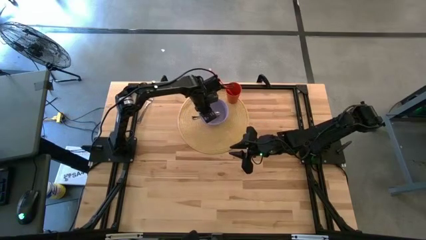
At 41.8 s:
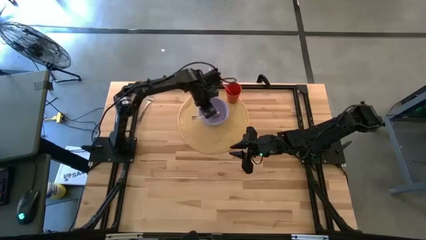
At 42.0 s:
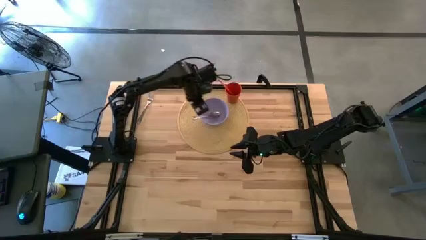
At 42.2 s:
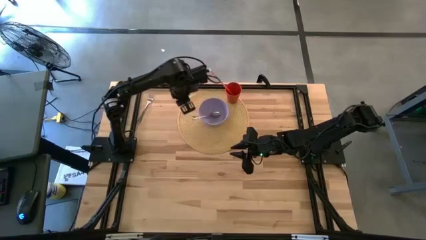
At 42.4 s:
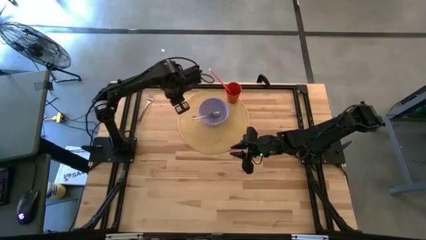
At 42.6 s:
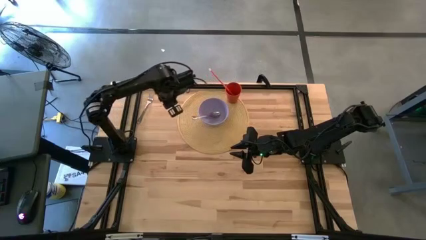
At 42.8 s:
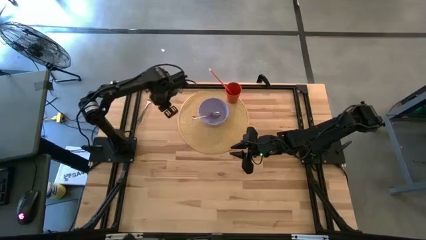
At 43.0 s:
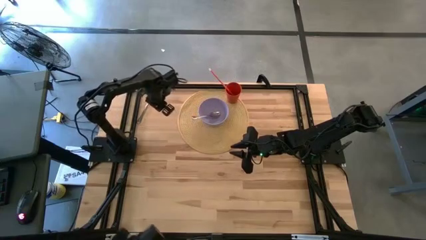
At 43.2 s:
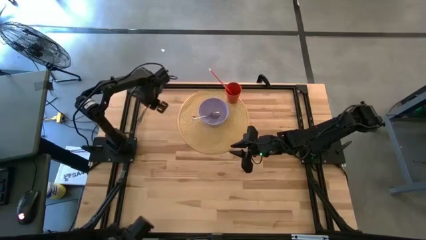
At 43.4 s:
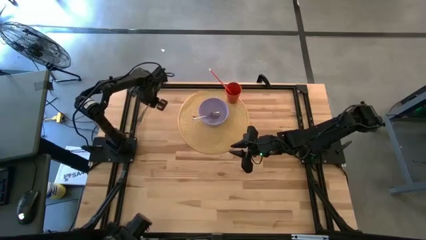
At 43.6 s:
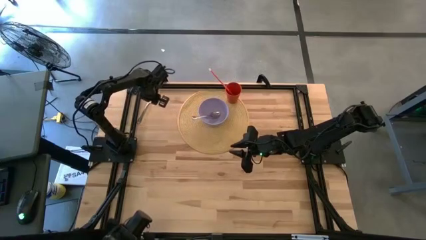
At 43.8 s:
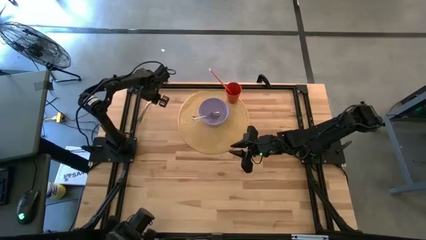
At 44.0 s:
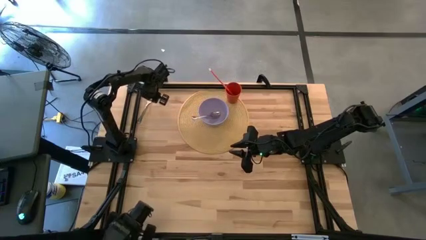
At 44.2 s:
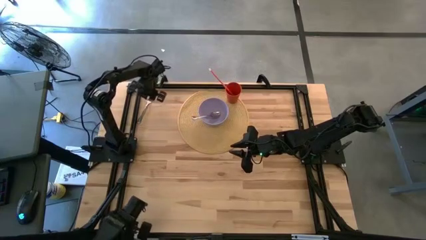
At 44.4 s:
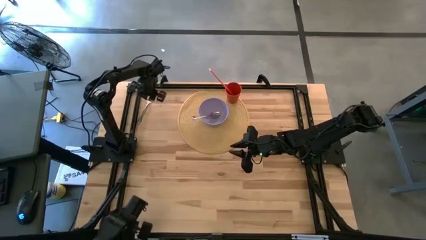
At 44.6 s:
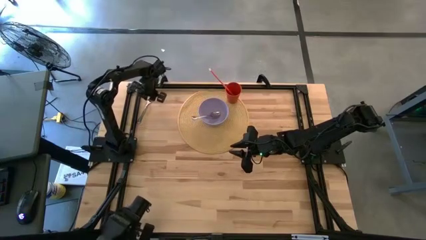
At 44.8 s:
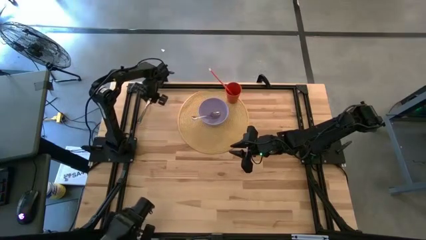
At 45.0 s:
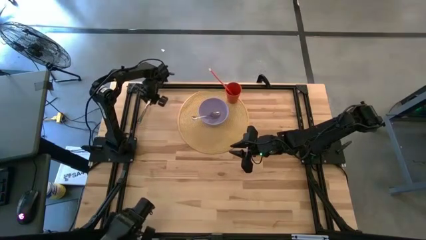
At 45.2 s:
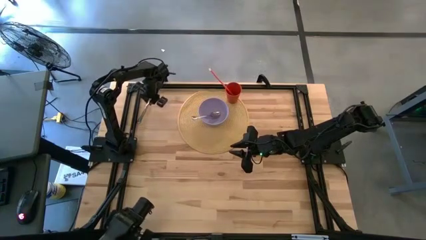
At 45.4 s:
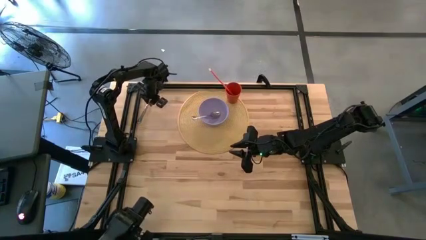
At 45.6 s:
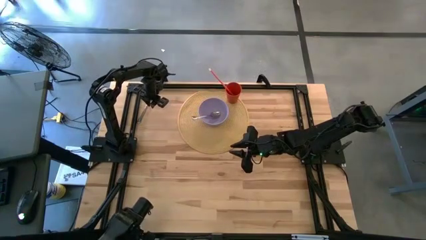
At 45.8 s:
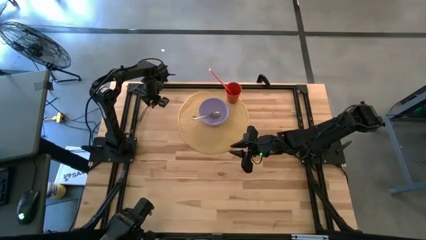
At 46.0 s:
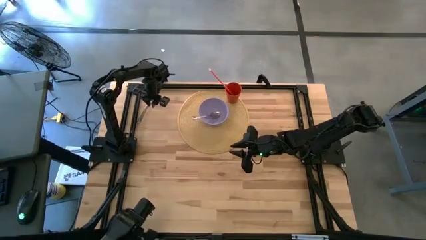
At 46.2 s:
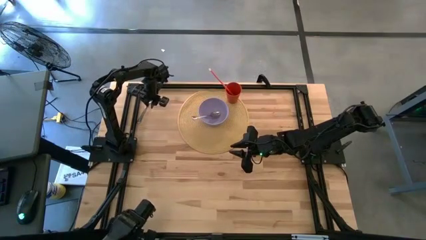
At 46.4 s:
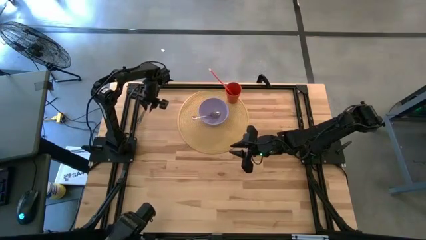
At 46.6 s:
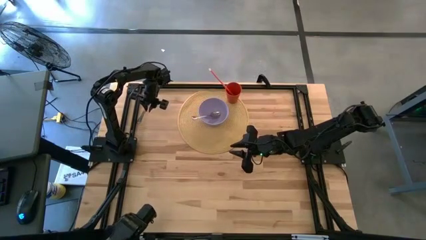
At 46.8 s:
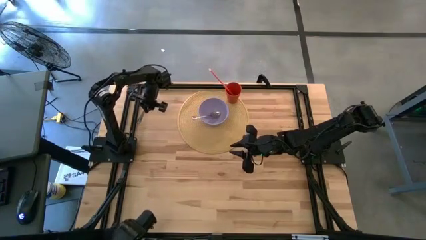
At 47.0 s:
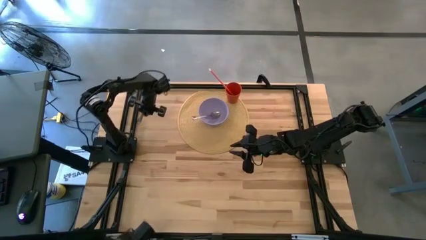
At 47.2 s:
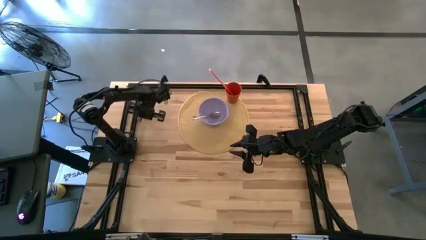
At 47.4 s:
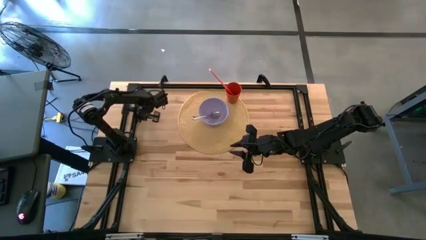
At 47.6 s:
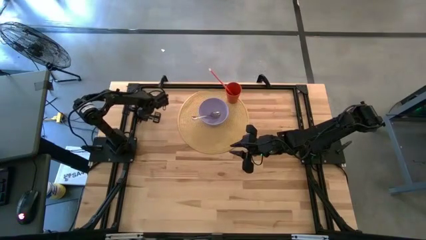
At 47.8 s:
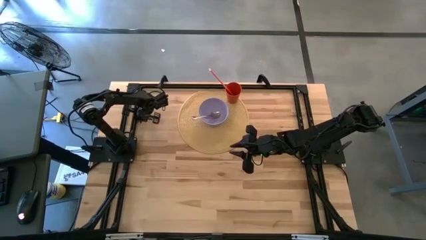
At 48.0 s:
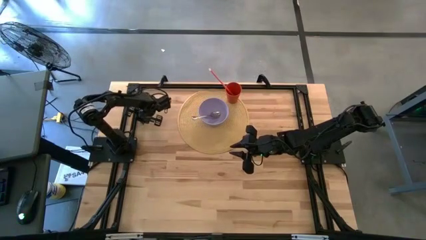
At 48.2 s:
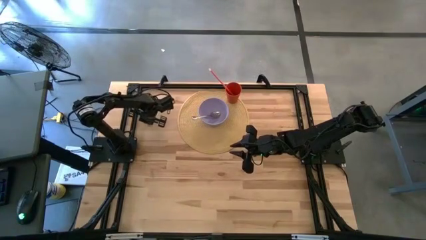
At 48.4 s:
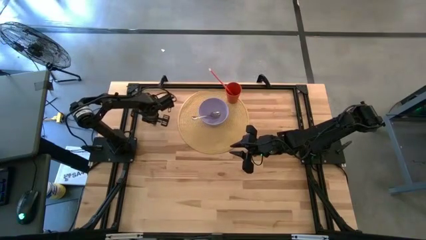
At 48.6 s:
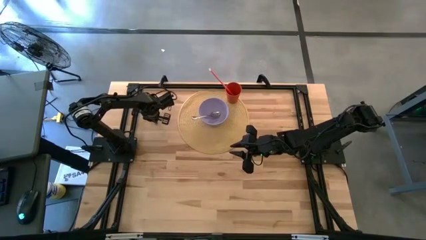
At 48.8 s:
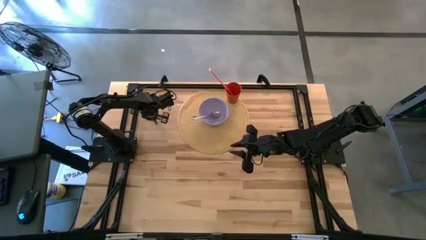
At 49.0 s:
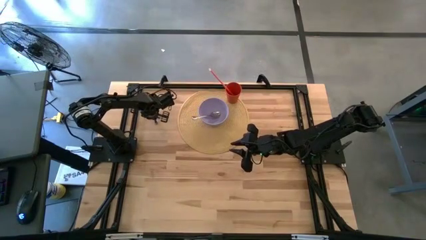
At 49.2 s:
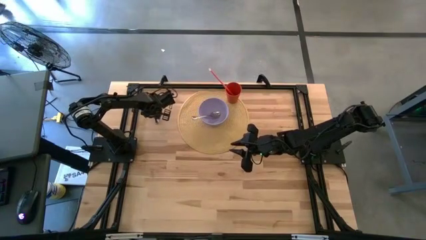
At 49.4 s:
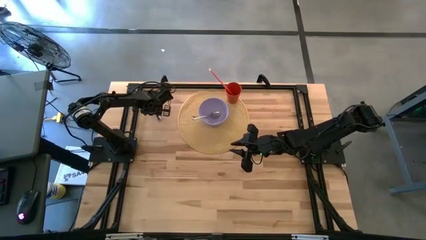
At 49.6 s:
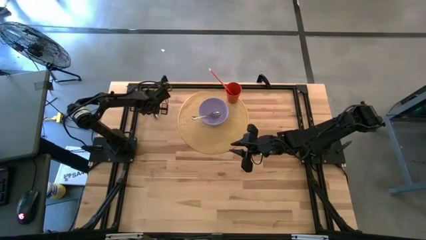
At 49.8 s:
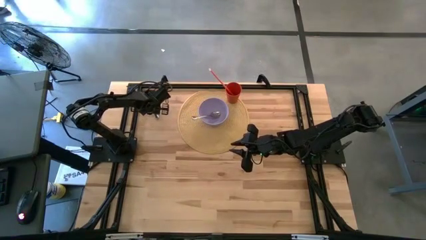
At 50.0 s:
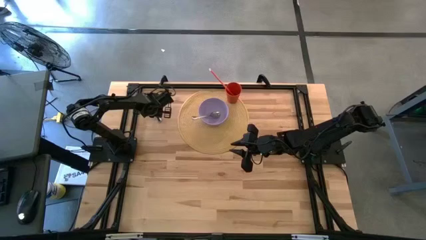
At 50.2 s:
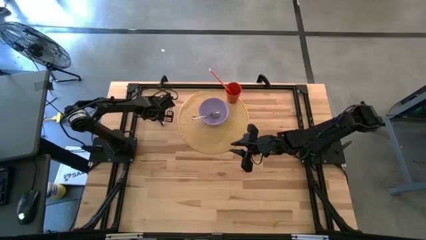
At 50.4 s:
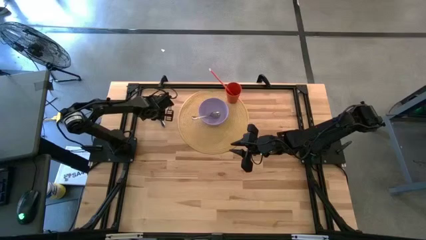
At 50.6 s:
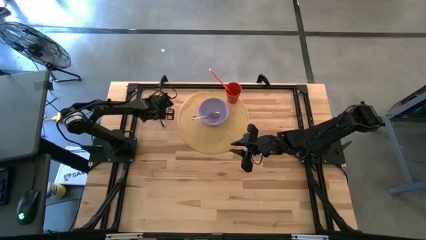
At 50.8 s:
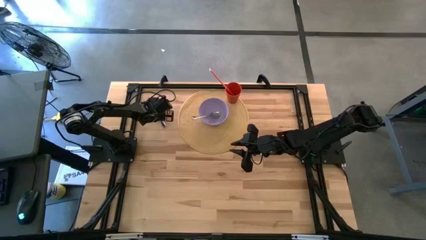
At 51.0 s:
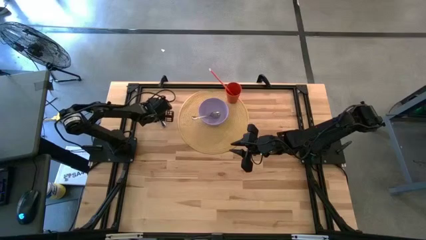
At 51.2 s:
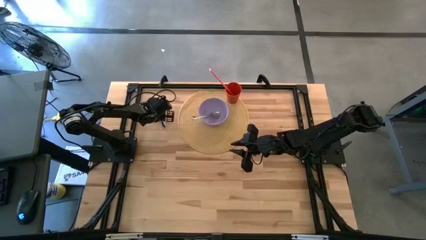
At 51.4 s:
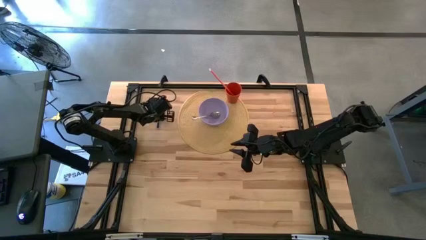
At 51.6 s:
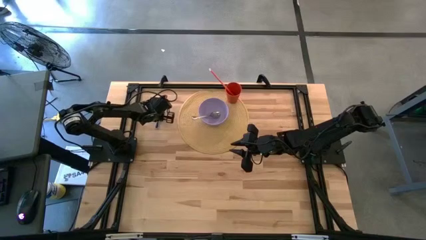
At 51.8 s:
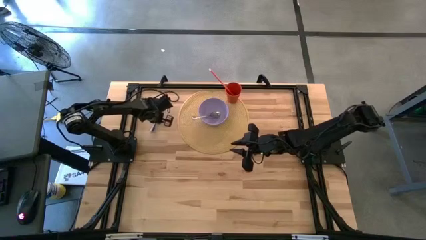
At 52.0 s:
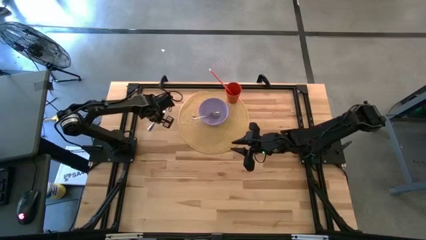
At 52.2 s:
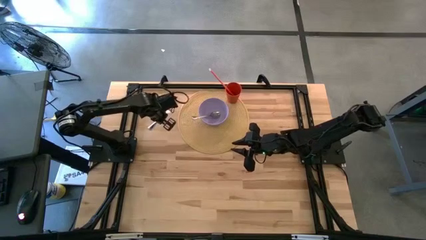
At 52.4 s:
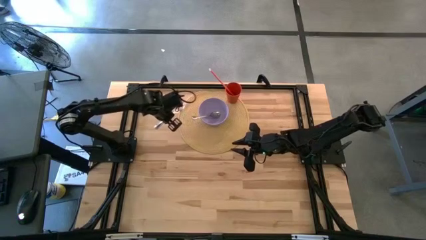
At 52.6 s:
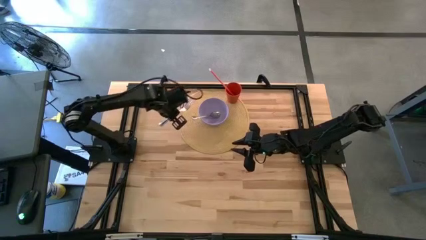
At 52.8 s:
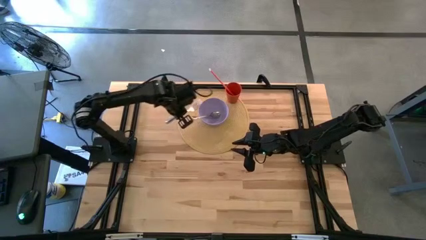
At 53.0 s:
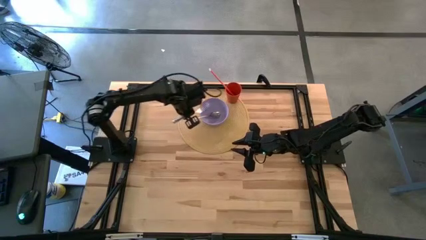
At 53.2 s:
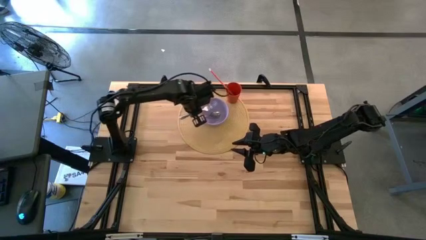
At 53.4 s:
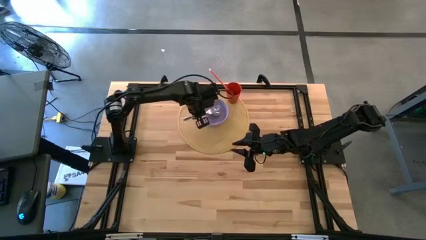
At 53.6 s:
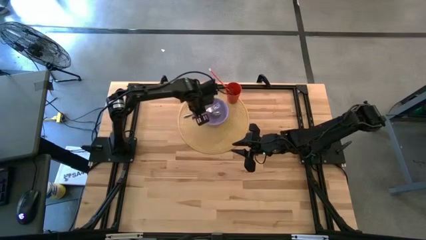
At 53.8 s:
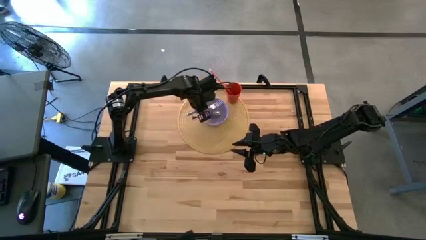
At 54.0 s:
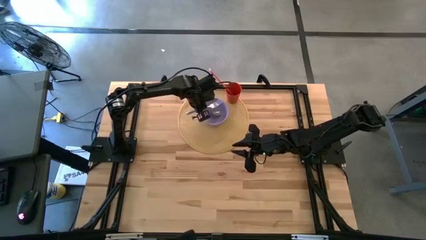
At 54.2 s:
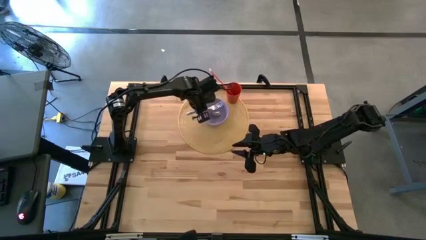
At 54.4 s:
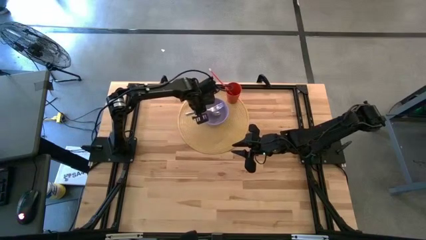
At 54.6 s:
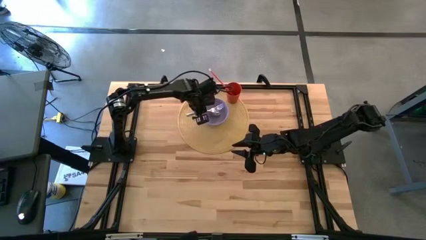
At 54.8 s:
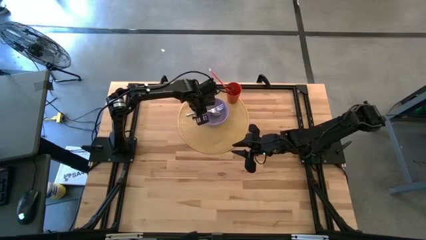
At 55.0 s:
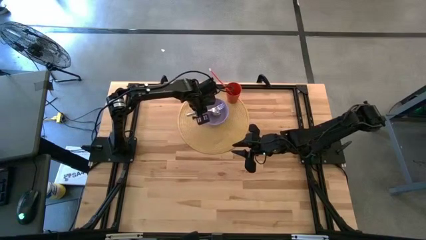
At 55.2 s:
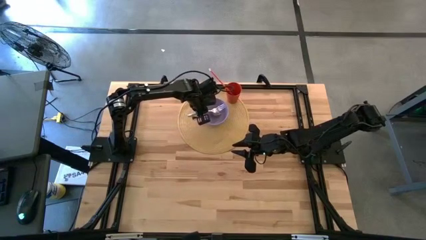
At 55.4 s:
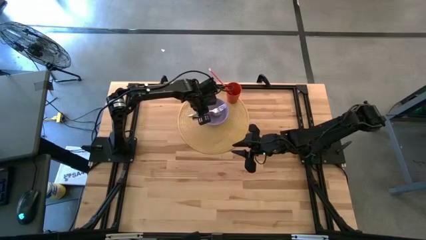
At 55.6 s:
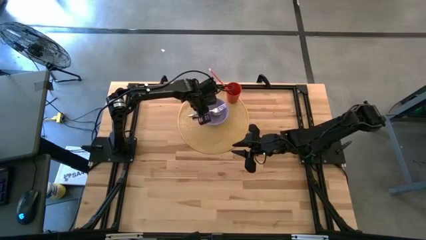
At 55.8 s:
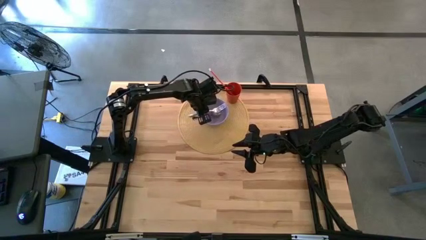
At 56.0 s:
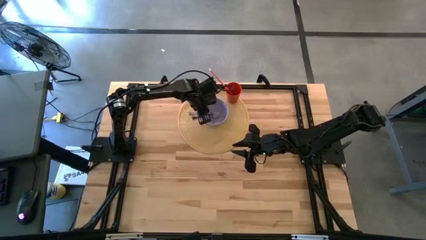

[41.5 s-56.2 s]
Task: Pick & Place Utensil
Put the silver fork in the purple bowl
